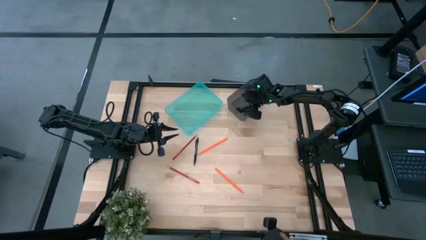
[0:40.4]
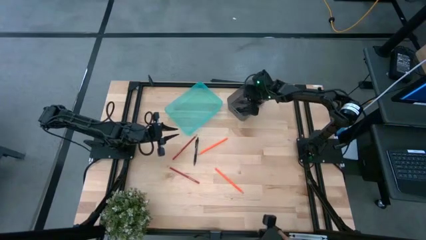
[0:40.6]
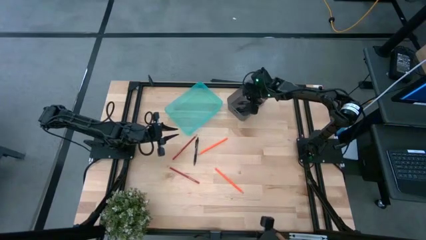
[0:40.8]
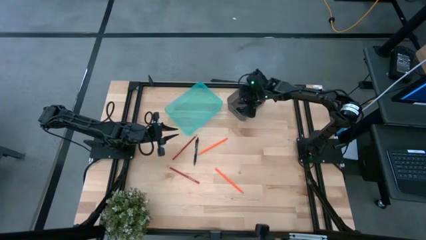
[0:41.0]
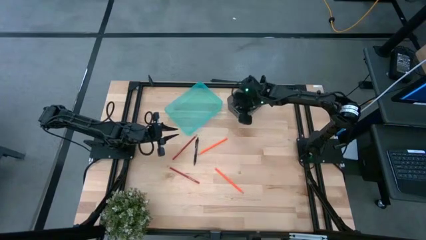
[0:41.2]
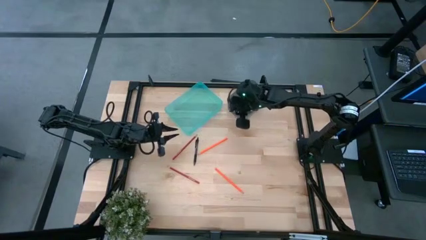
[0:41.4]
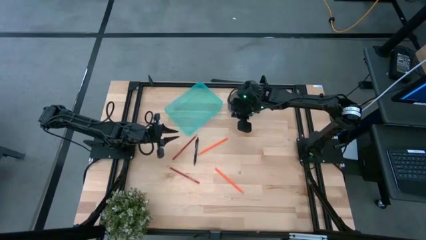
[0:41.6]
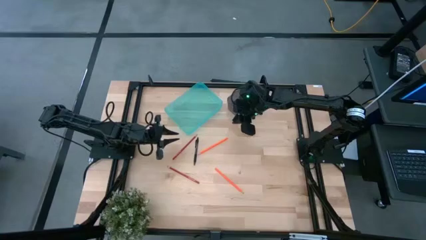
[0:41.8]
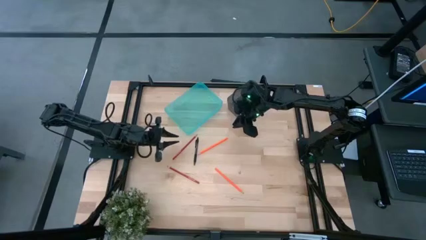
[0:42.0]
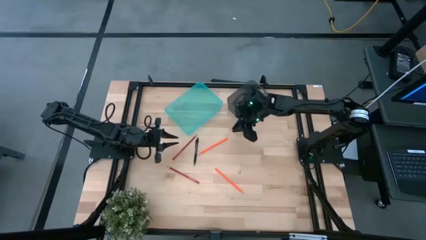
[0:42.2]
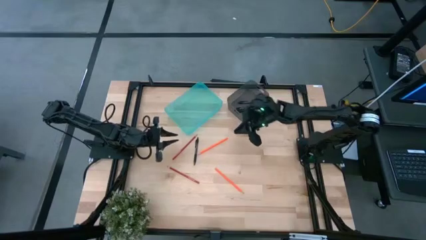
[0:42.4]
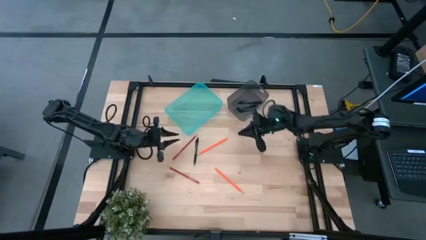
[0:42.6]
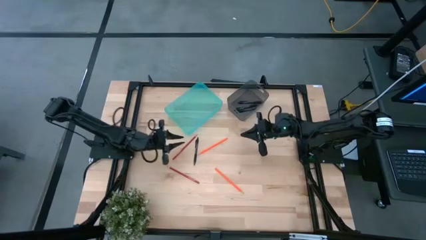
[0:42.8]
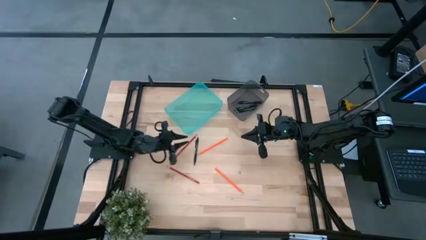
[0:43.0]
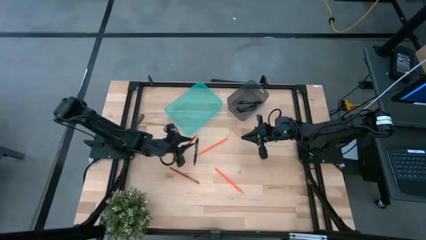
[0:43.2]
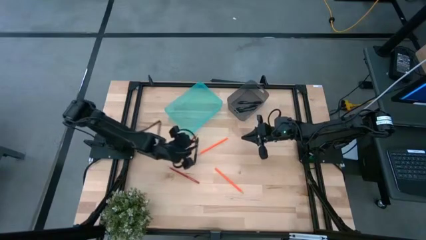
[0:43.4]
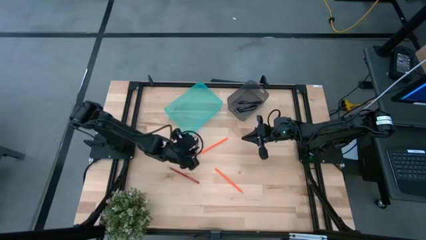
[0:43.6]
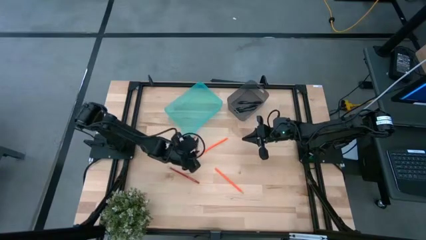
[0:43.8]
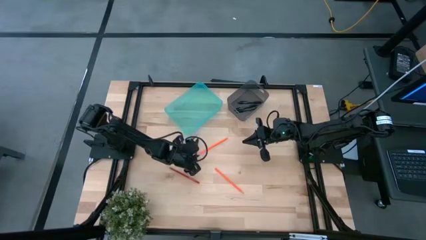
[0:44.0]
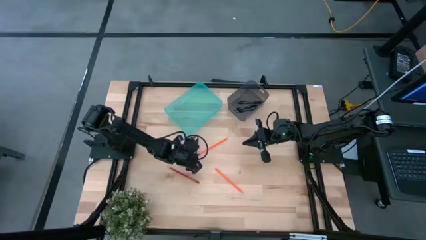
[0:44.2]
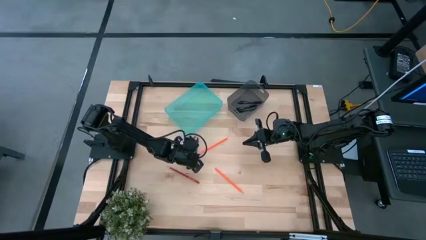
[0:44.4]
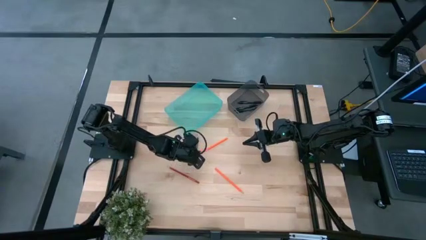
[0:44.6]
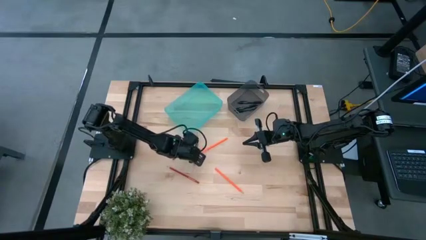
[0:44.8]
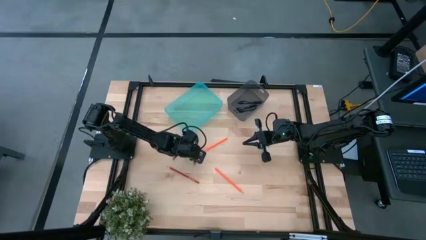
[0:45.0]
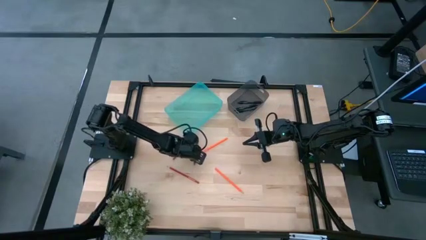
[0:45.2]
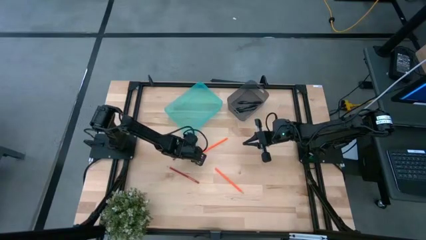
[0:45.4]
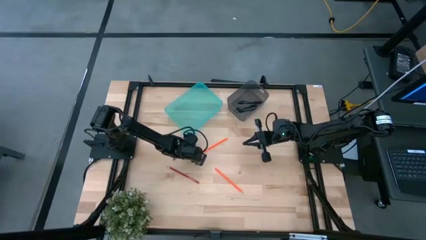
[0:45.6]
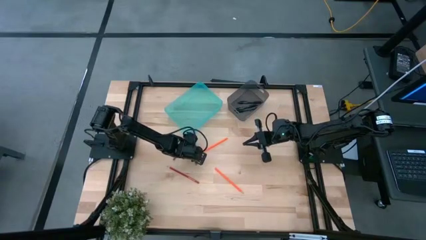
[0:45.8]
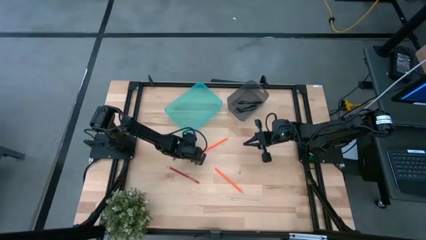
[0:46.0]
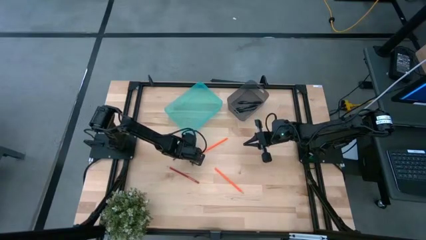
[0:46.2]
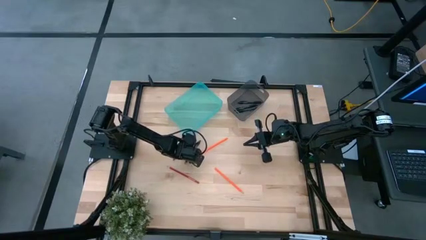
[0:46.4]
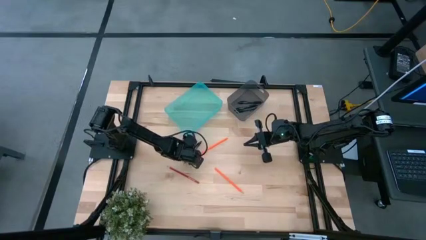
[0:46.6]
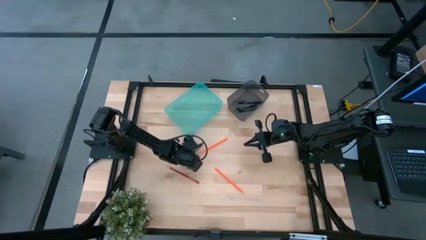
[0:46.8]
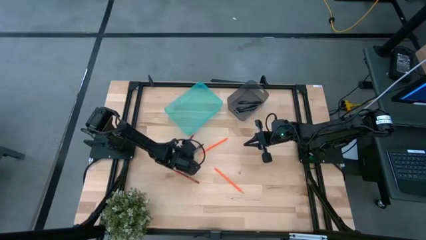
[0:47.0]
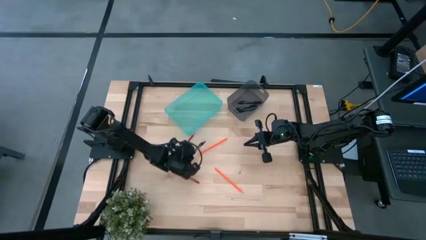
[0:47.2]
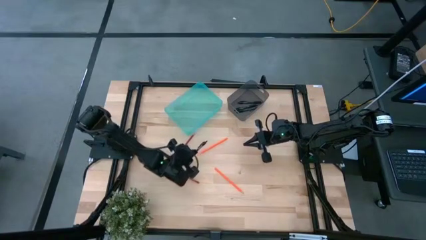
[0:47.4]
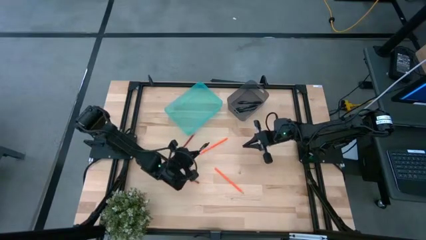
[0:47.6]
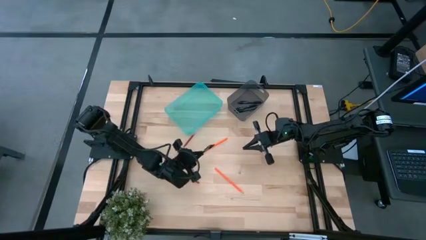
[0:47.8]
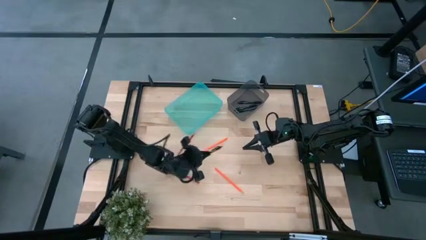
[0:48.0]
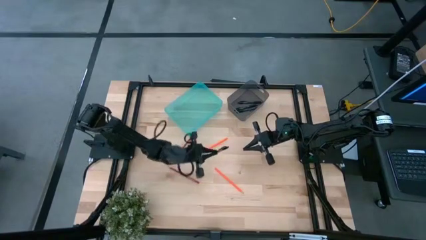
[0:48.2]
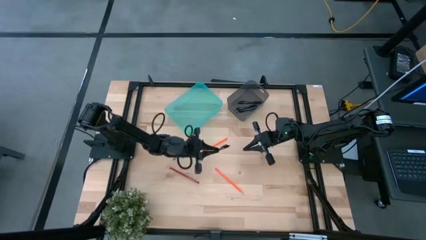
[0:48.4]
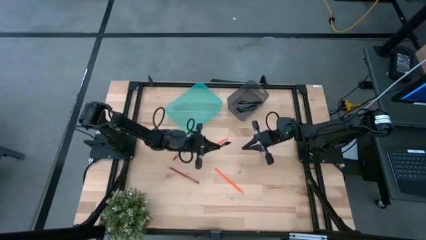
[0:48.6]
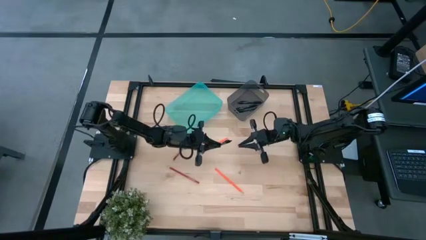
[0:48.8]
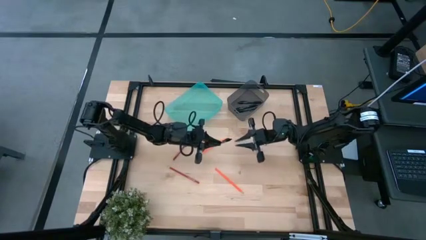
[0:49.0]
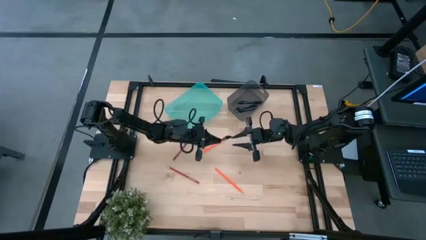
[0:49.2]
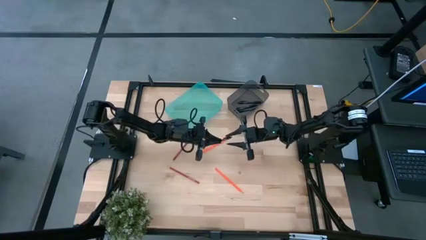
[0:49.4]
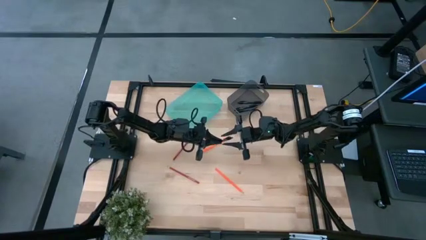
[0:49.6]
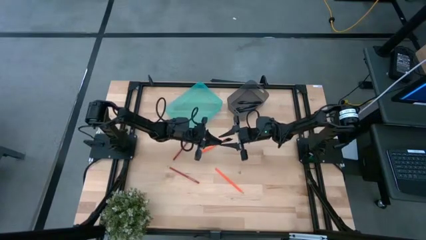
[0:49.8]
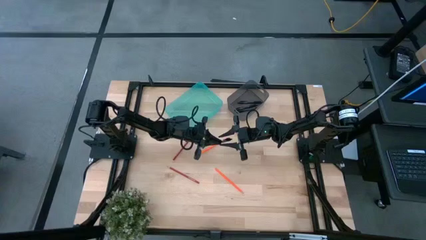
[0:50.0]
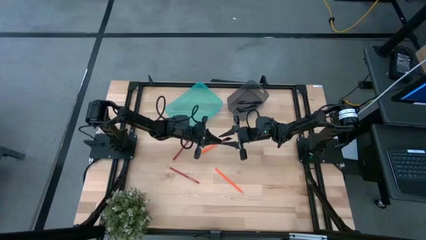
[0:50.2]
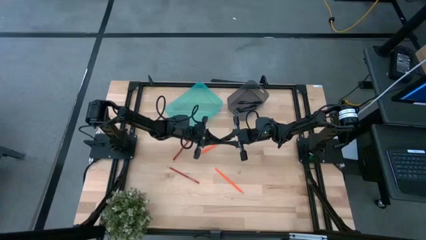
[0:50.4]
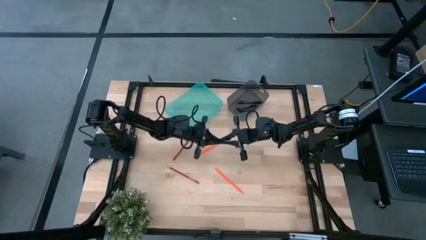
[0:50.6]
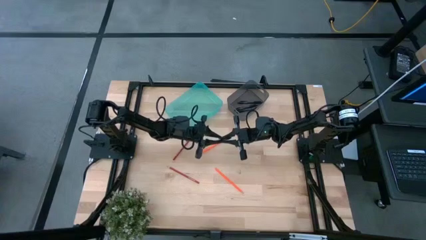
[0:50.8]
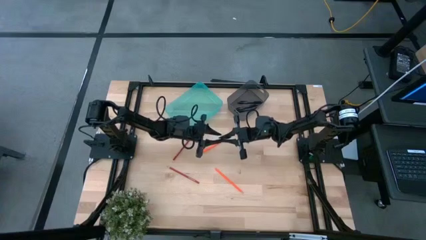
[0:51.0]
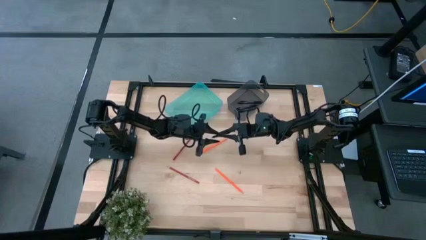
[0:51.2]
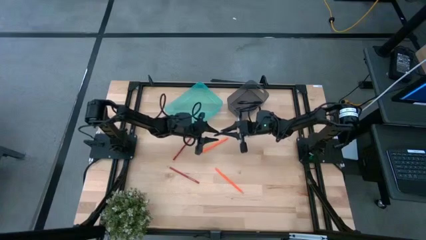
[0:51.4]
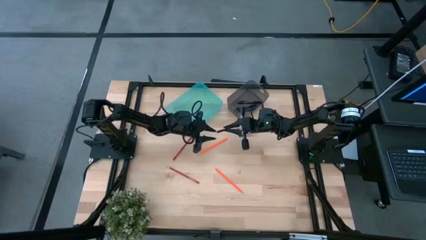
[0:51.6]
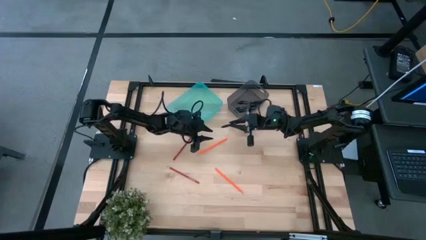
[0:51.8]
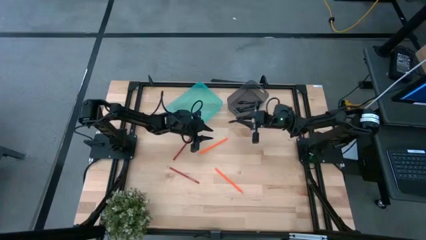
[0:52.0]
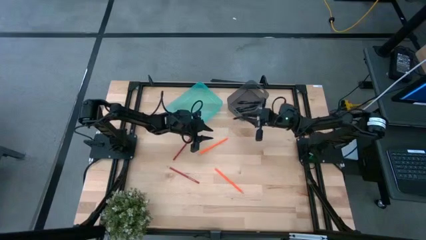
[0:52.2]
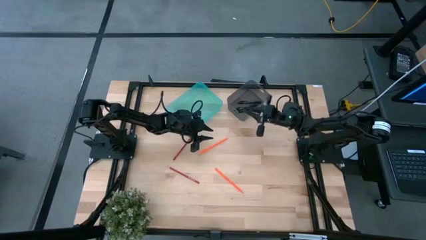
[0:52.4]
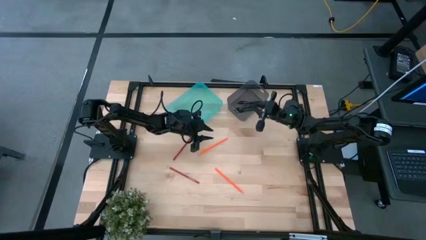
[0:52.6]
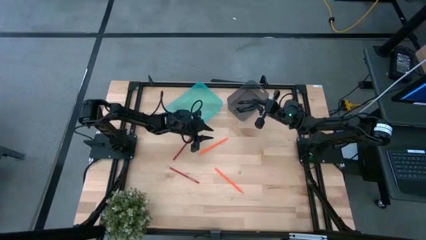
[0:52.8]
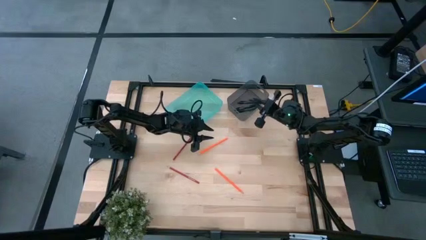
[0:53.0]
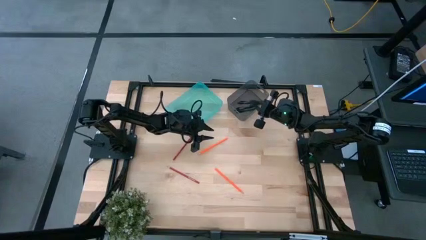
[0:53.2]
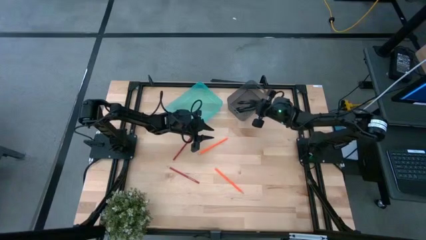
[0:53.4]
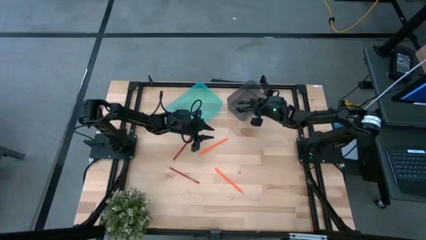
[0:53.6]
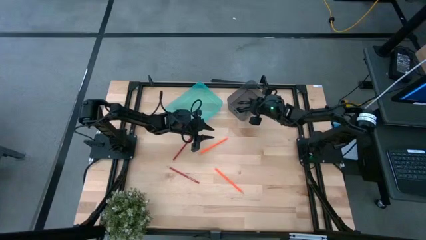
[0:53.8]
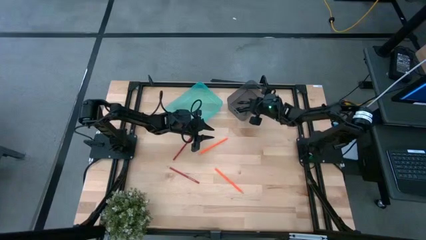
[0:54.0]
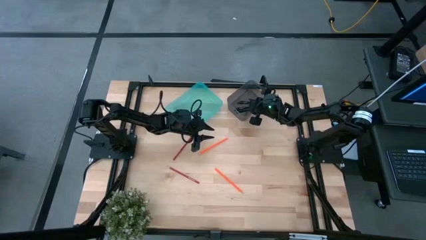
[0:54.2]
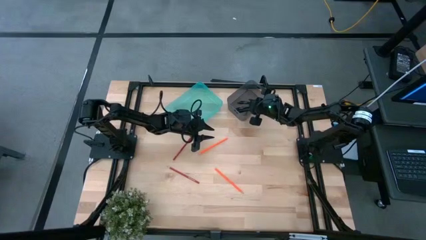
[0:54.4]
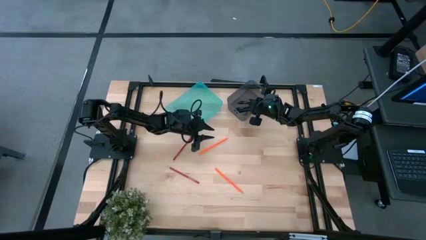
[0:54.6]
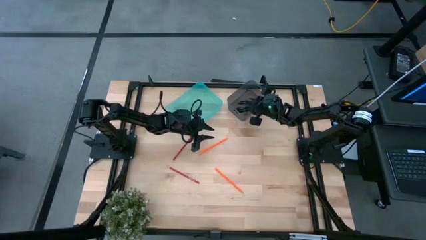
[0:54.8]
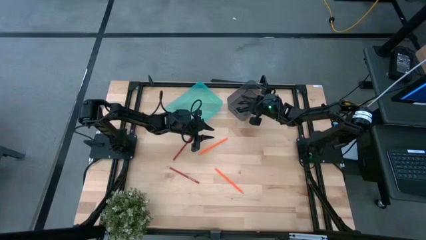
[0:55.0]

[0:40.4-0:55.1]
Task: Sort pens & pencils
Put the black pen into the gray bin

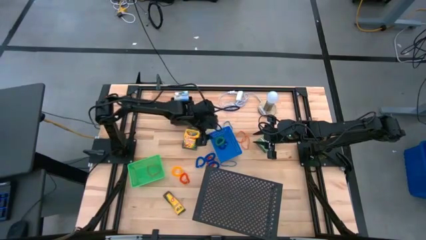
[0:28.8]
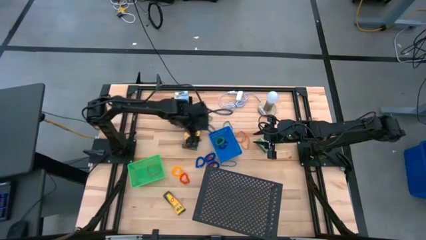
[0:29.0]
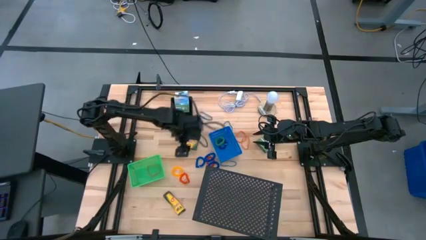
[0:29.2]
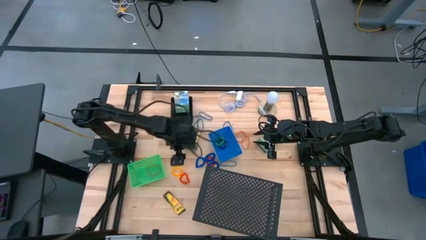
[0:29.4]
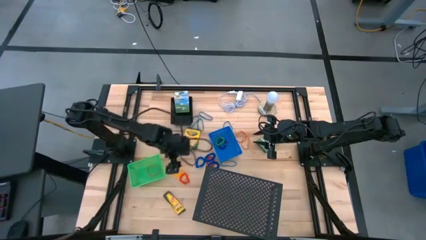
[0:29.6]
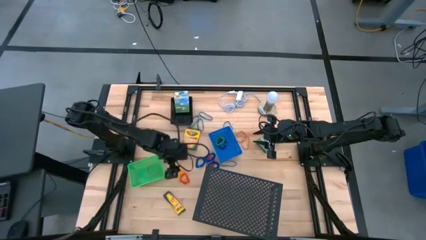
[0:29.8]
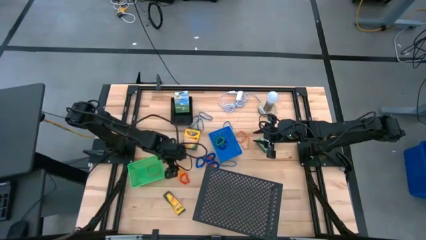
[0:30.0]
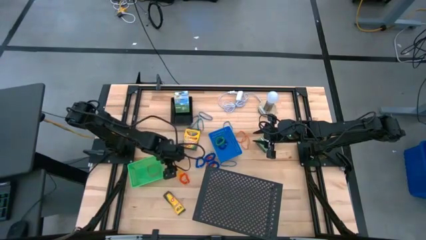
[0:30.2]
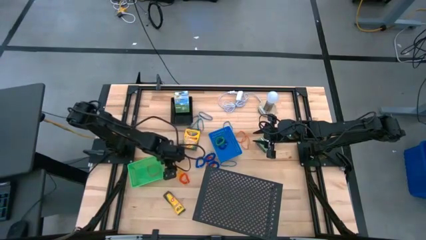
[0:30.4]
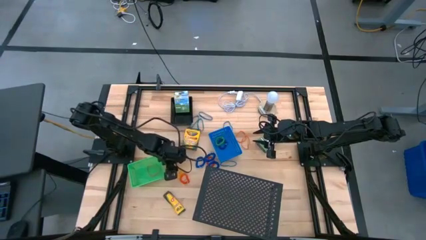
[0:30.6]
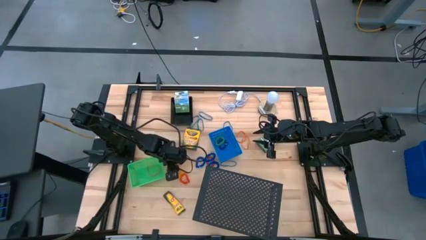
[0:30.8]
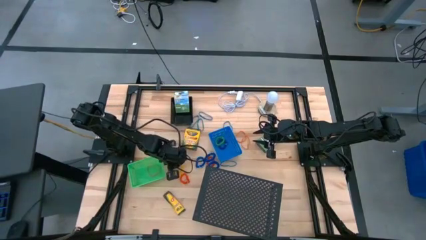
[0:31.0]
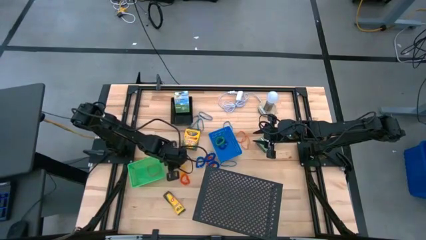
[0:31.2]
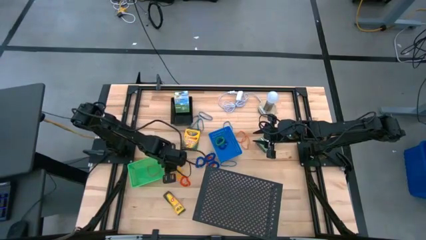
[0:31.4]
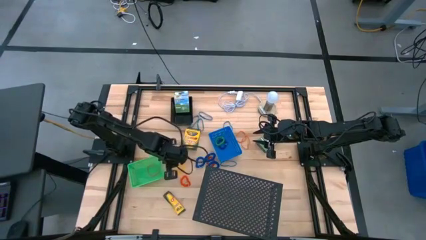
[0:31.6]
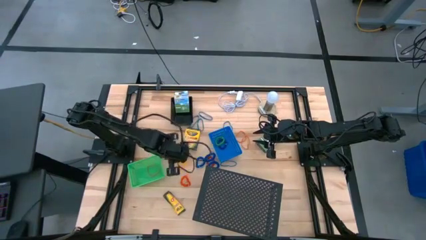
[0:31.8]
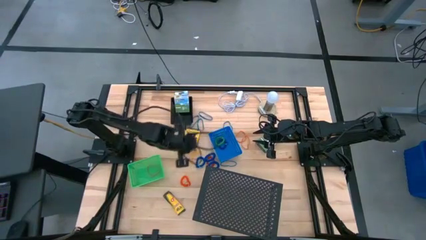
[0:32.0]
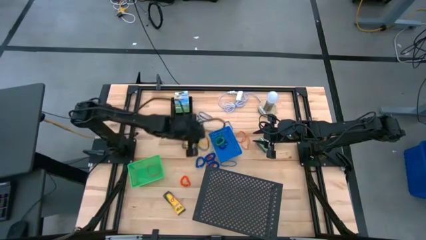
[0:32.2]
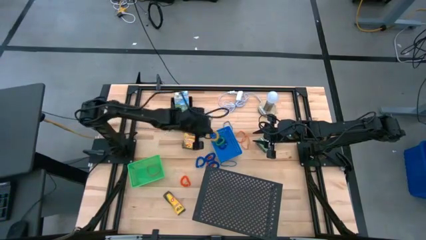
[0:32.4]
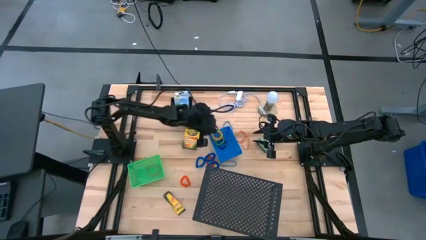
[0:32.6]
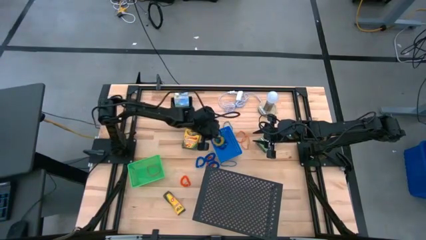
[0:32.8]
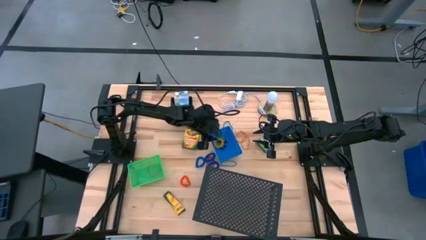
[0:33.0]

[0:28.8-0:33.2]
Task: Pick & Place Office Desk Supplies
Put the yellow key band into the blue bin
